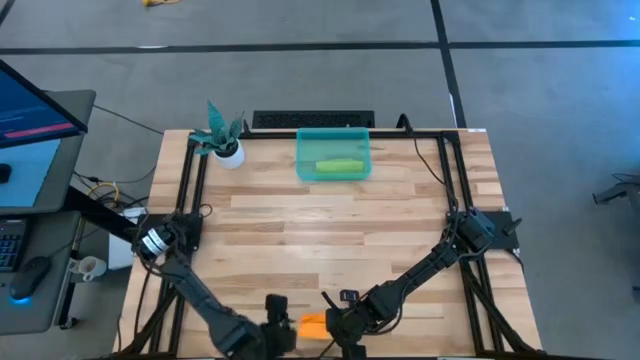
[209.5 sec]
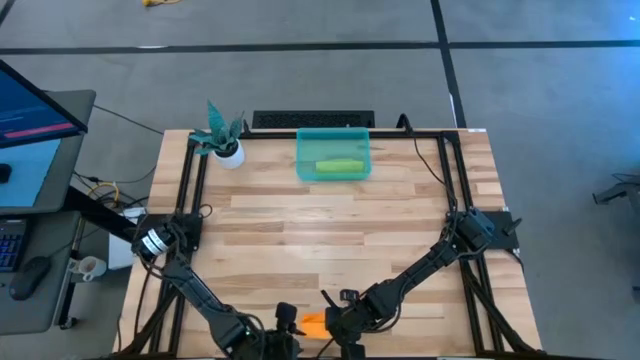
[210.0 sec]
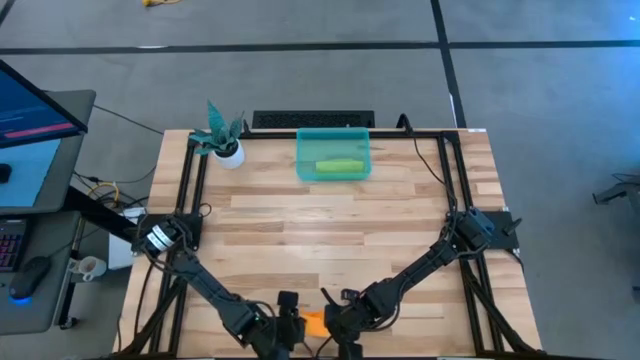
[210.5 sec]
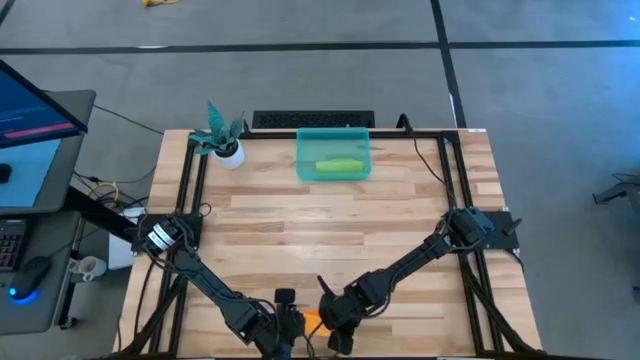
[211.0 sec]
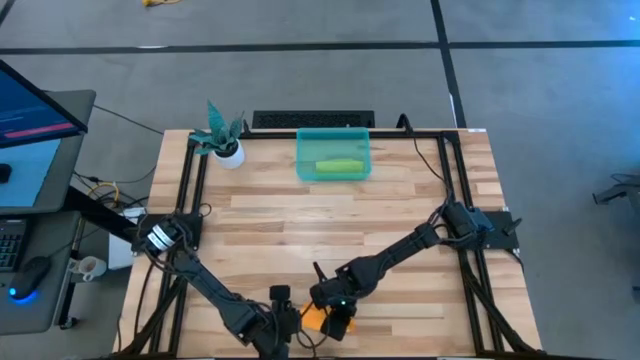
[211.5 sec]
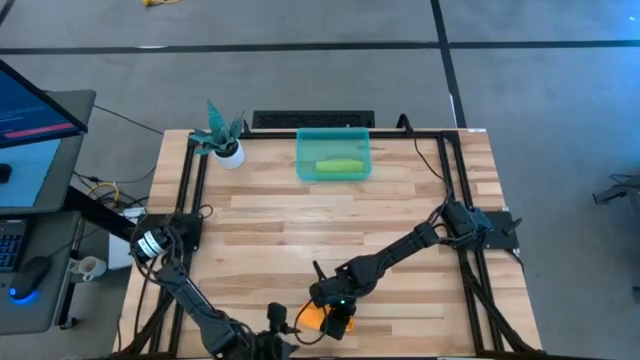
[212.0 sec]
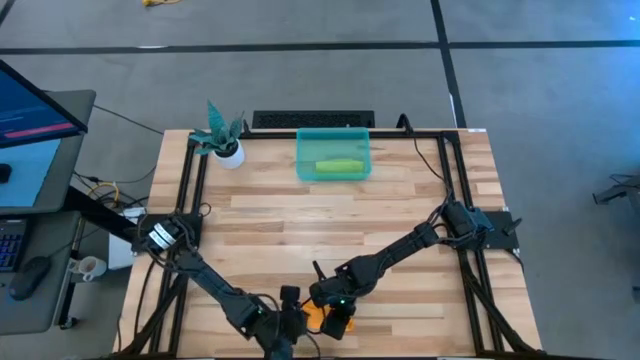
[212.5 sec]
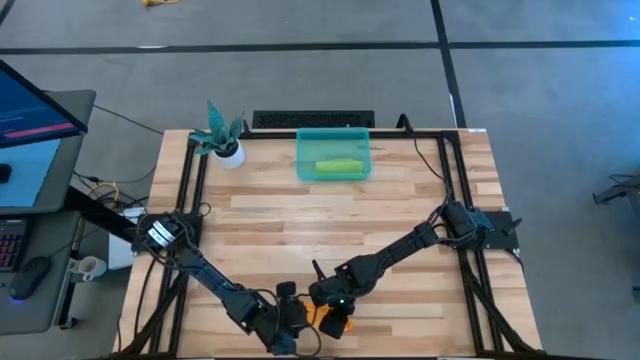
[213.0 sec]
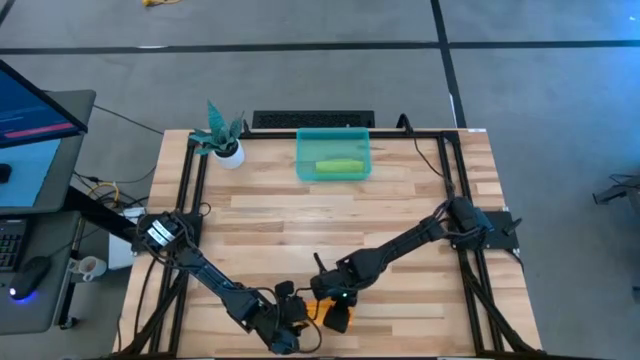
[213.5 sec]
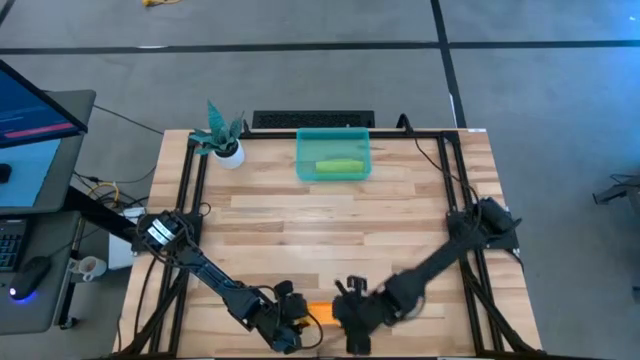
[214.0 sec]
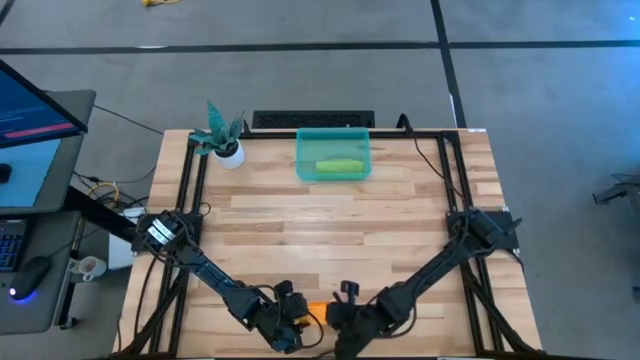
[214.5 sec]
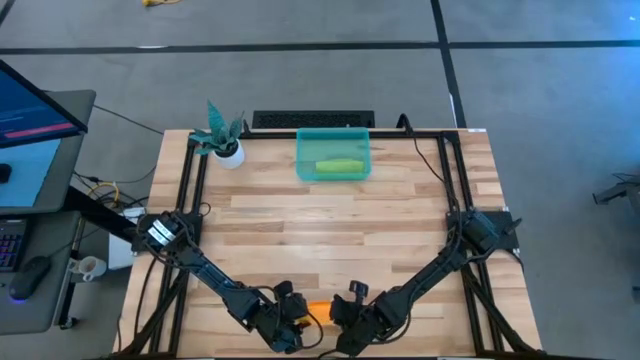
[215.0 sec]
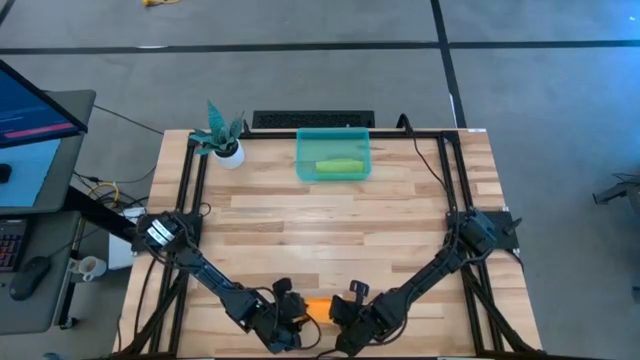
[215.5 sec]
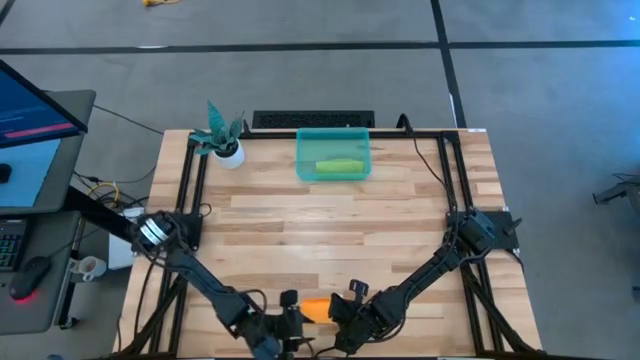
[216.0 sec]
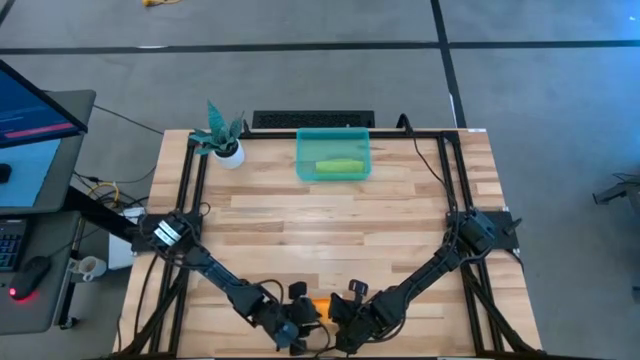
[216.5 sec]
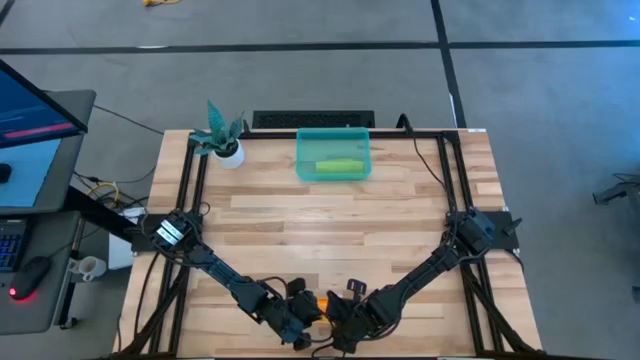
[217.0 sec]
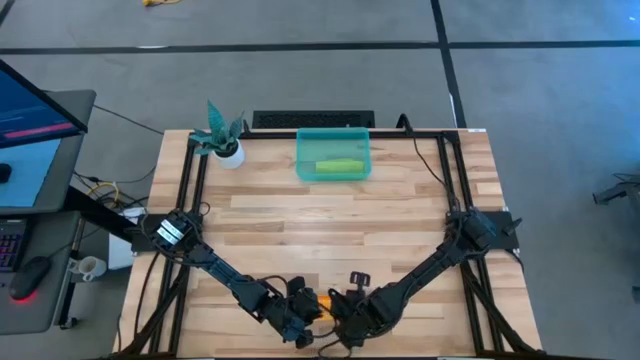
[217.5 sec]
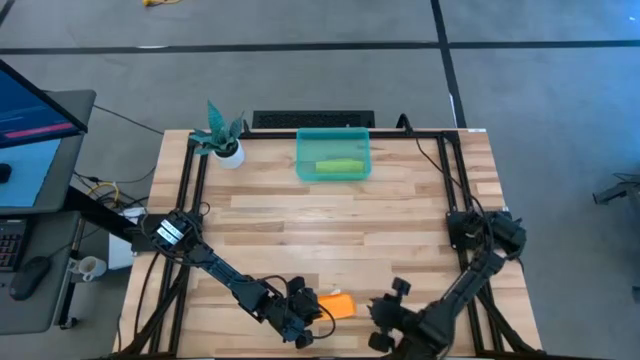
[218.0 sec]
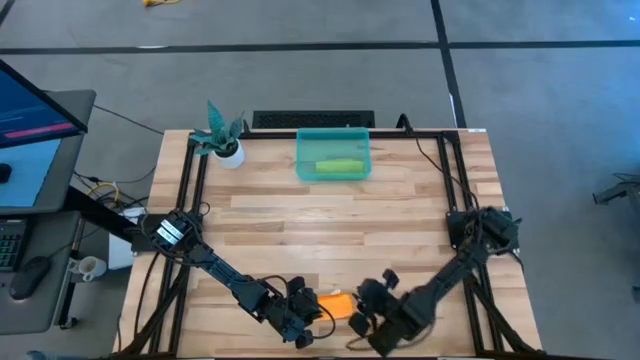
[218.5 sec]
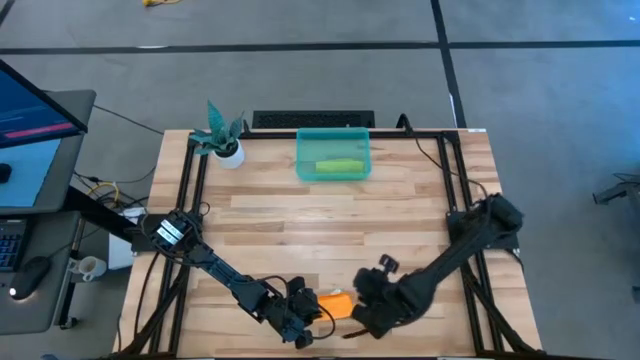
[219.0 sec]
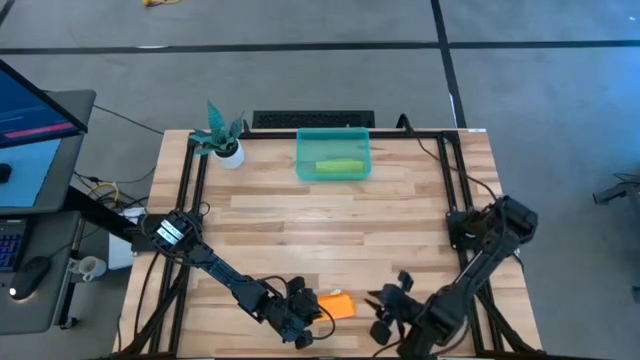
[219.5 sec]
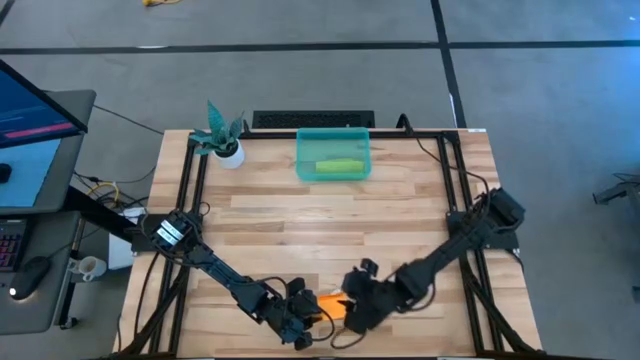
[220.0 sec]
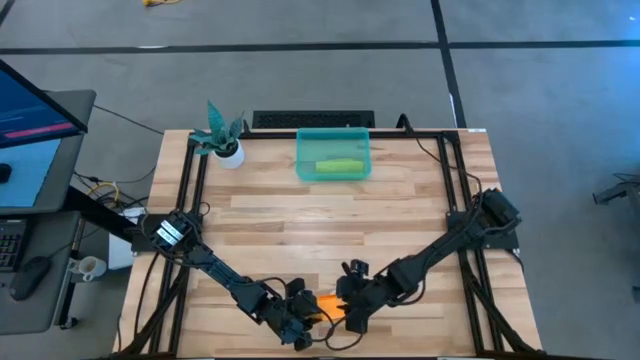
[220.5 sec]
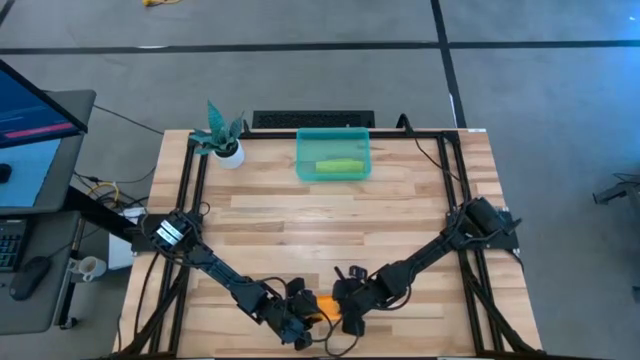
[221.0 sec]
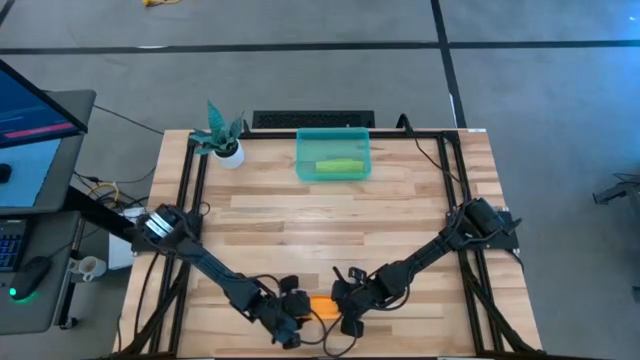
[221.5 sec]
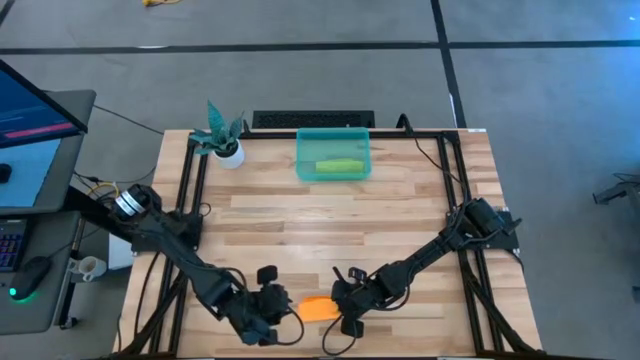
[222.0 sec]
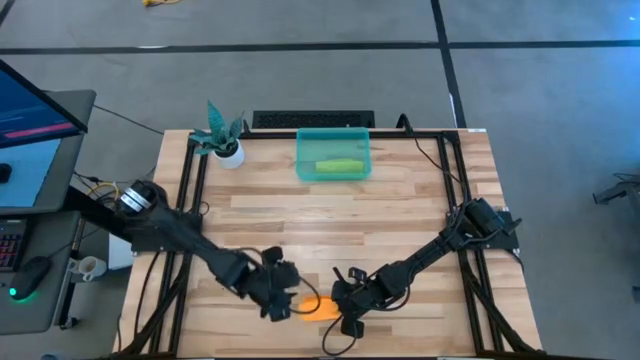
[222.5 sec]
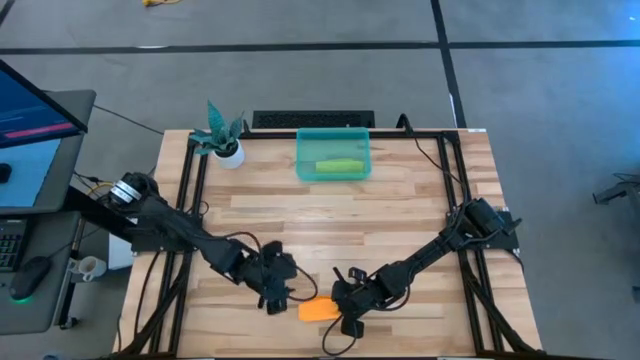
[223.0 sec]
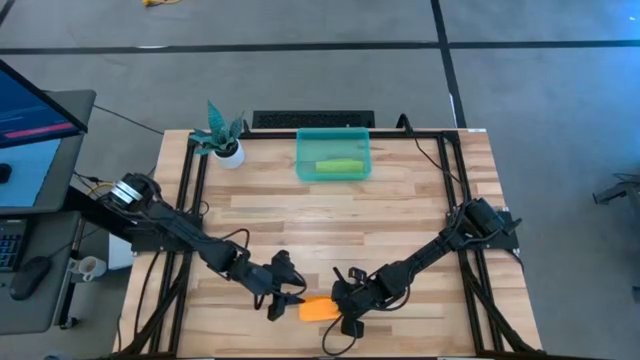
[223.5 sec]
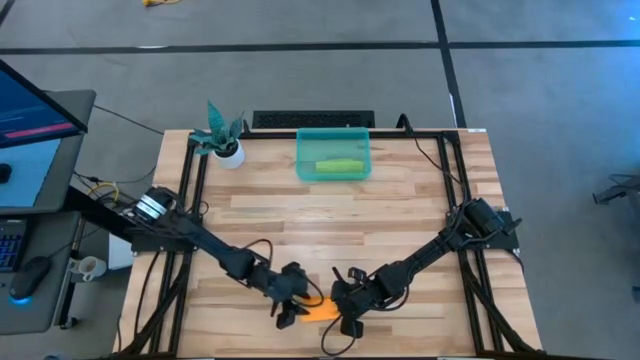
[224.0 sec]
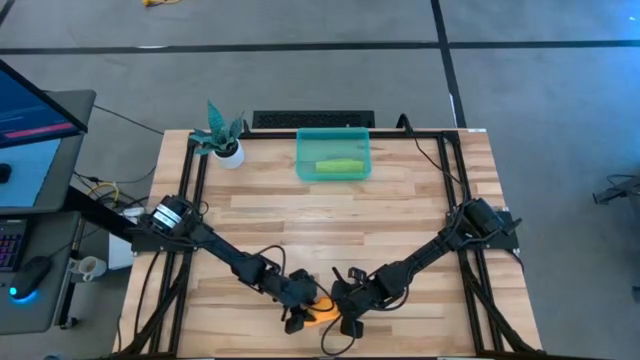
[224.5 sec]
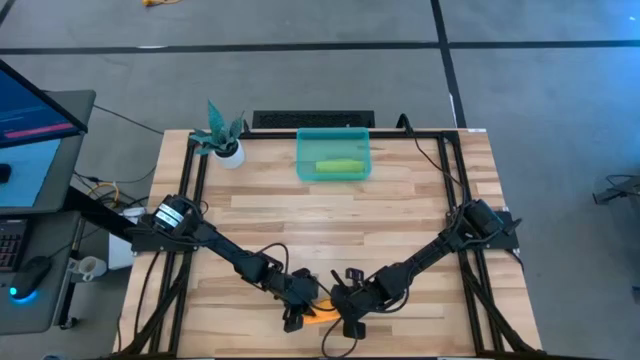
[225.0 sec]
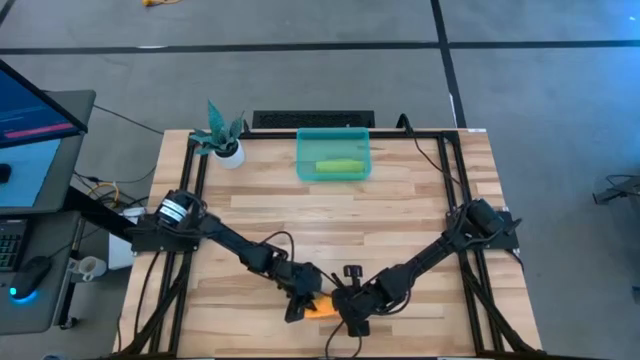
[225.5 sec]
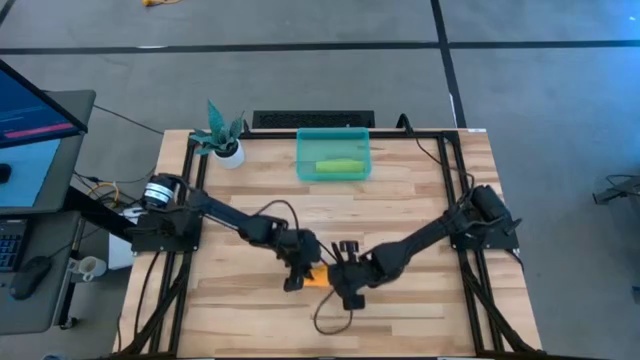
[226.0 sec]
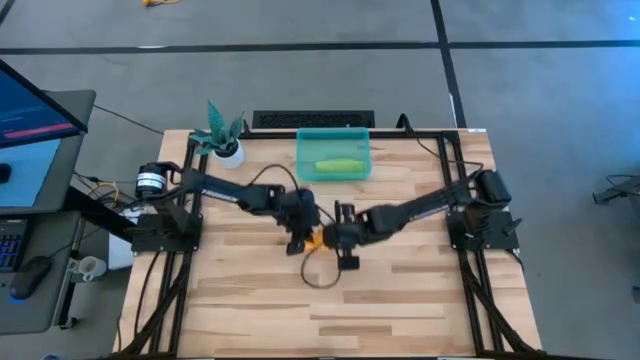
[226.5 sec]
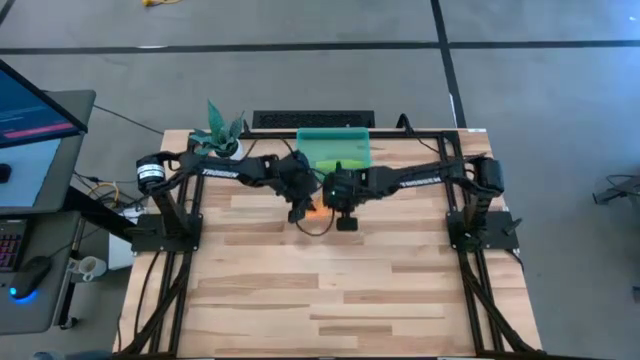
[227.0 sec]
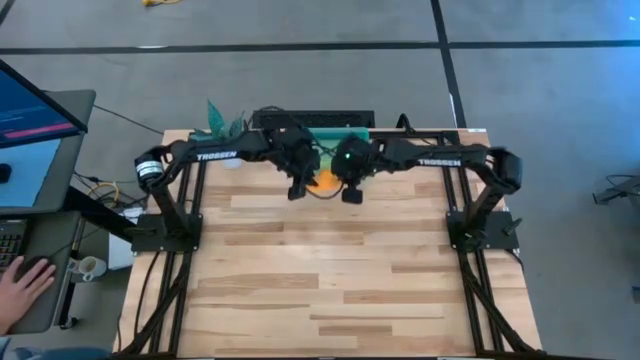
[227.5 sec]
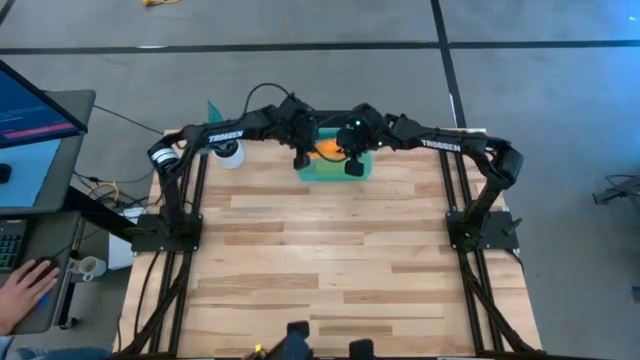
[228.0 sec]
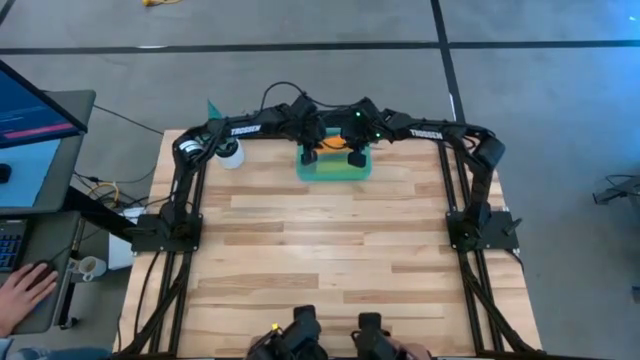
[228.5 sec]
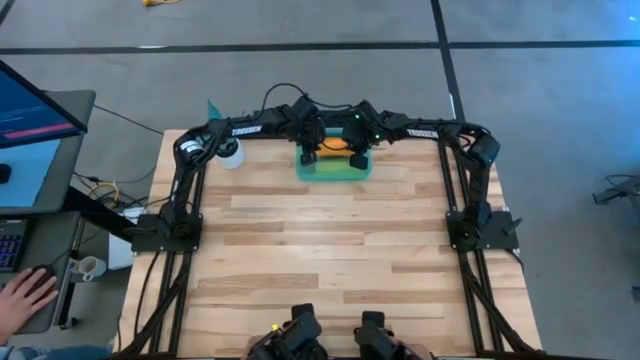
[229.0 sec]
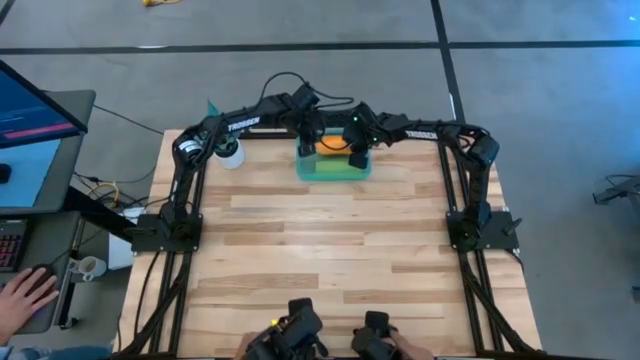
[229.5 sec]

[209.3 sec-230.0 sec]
Task: Roll towel into tight, uniform cylinder
Roll the orange microfiber towel

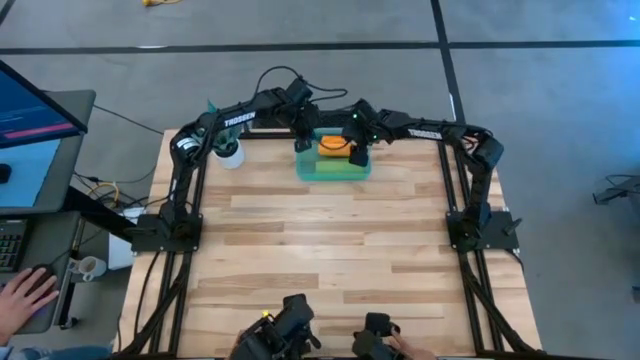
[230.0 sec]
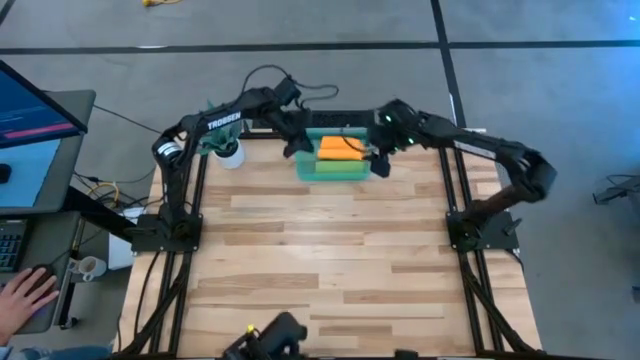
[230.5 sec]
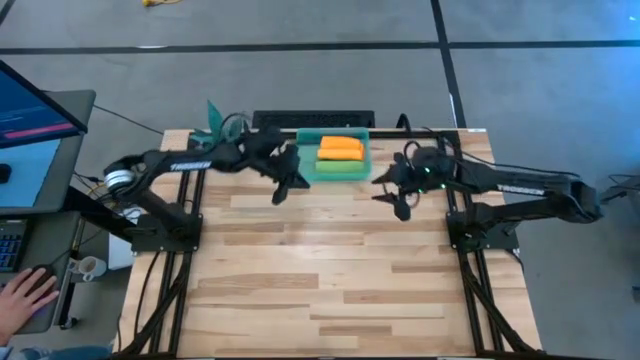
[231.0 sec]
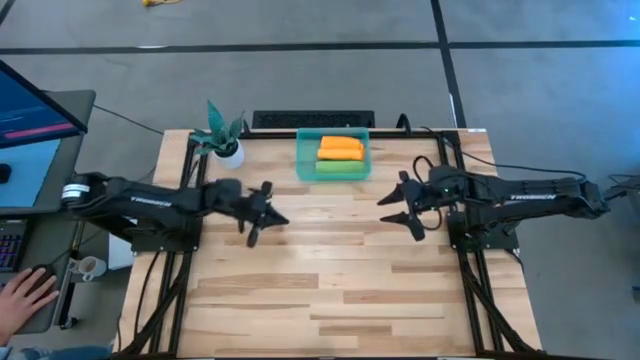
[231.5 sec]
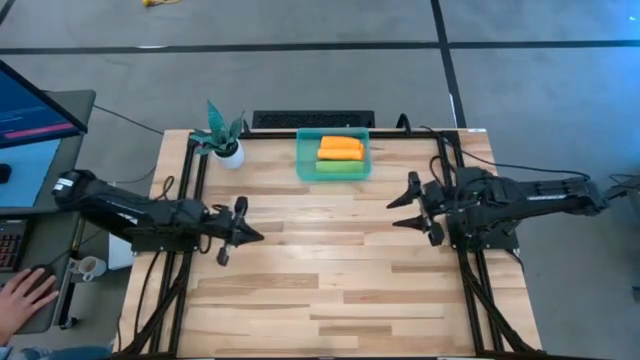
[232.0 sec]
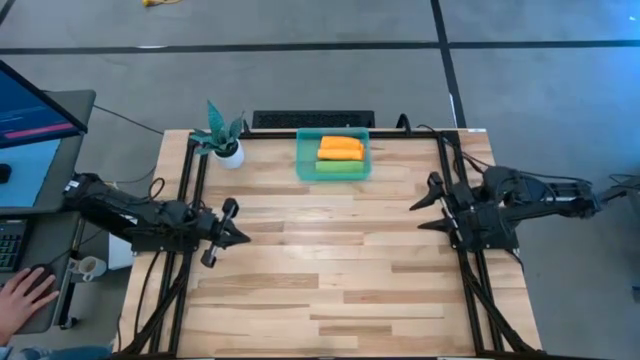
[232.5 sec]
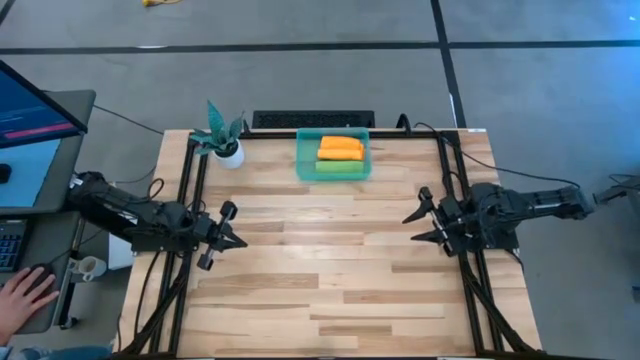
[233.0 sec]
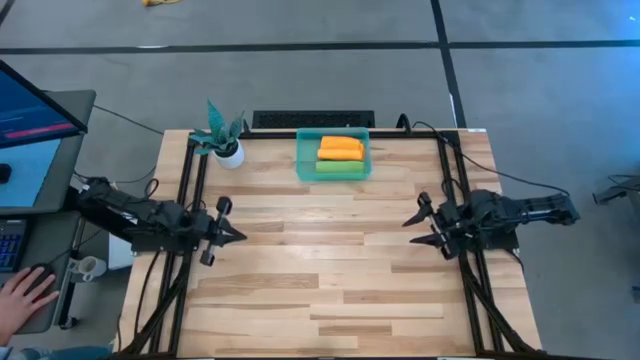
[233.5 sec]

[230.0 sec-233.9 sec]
Return to Home Position
